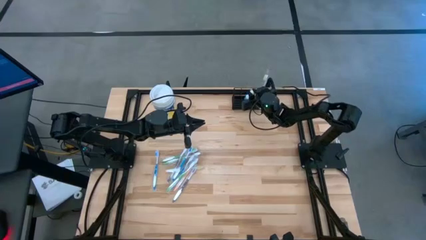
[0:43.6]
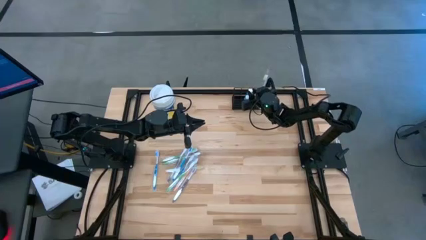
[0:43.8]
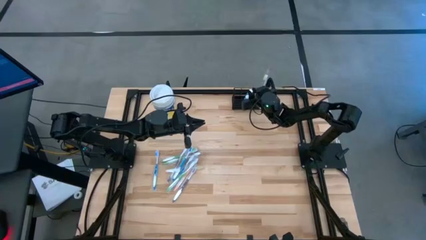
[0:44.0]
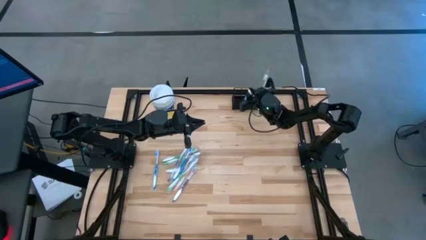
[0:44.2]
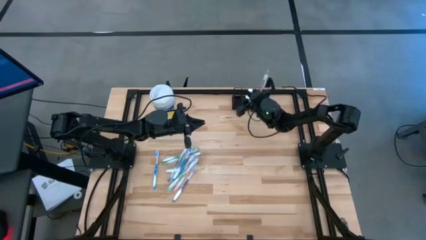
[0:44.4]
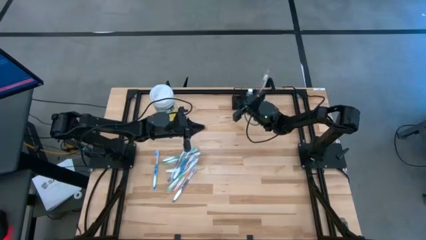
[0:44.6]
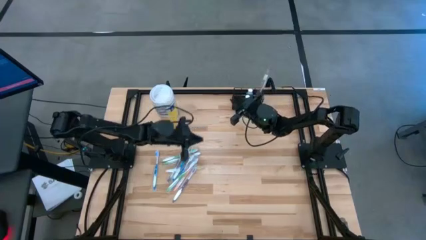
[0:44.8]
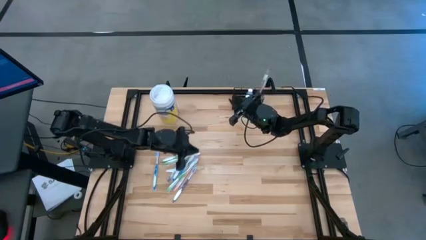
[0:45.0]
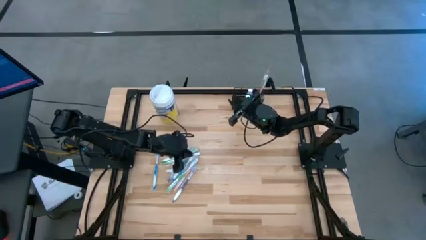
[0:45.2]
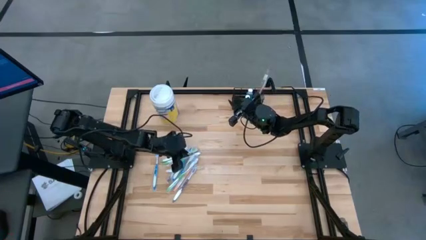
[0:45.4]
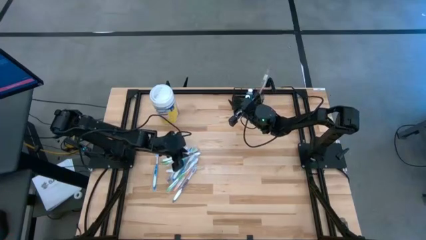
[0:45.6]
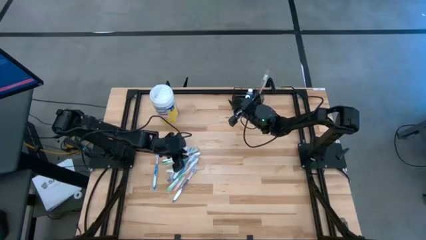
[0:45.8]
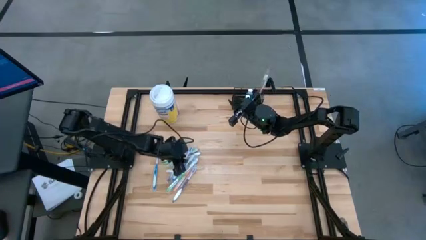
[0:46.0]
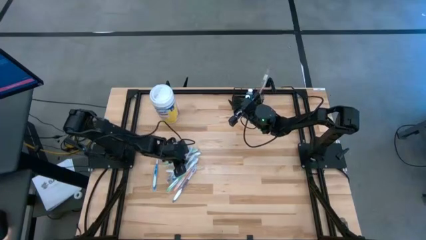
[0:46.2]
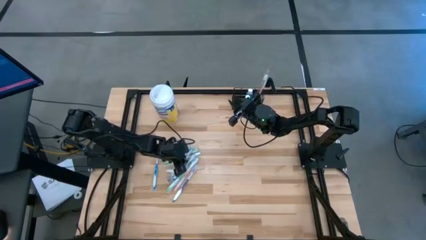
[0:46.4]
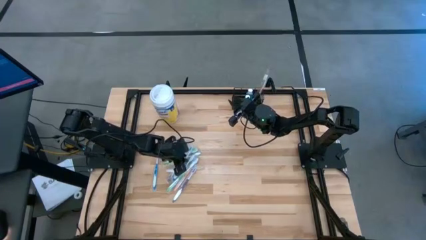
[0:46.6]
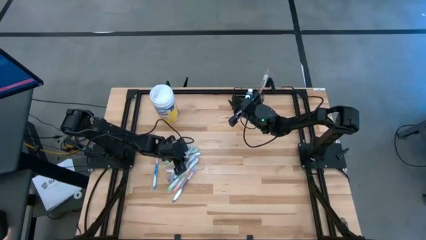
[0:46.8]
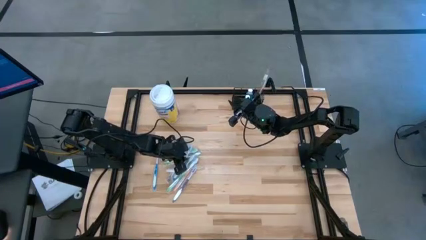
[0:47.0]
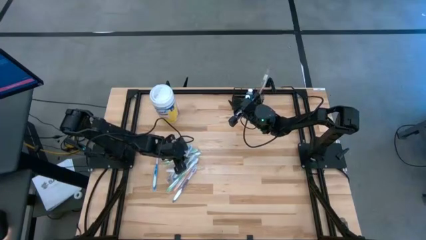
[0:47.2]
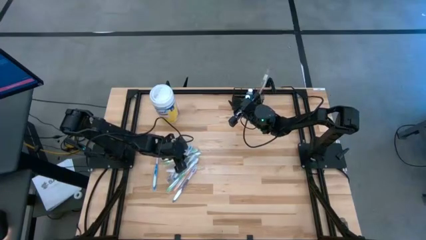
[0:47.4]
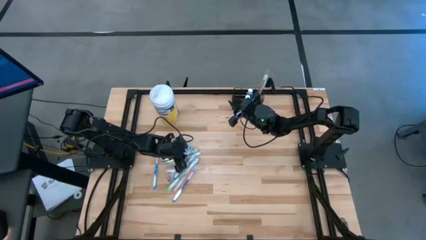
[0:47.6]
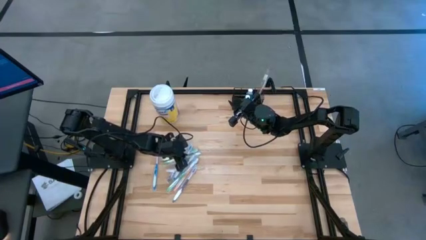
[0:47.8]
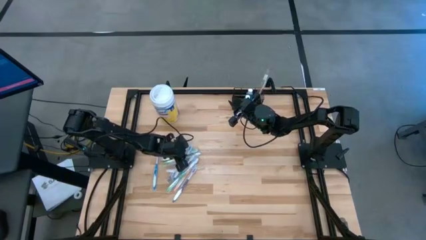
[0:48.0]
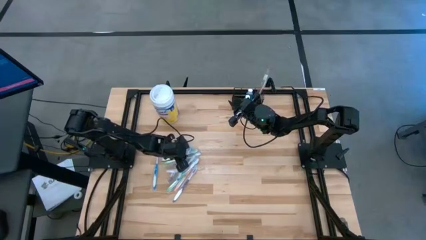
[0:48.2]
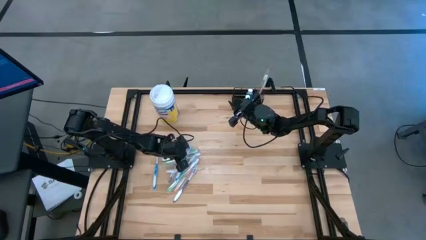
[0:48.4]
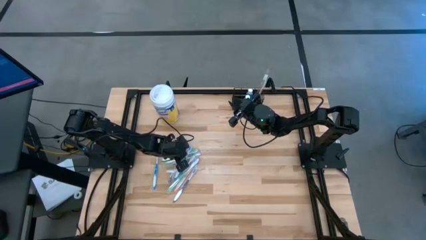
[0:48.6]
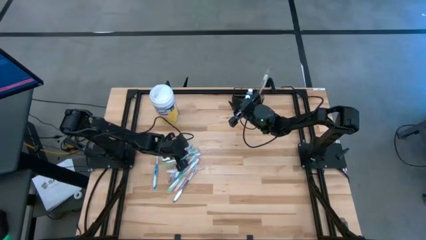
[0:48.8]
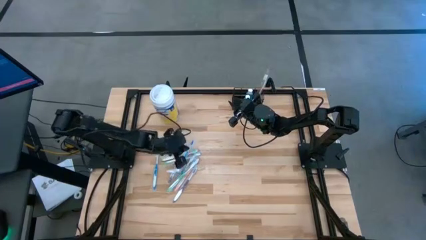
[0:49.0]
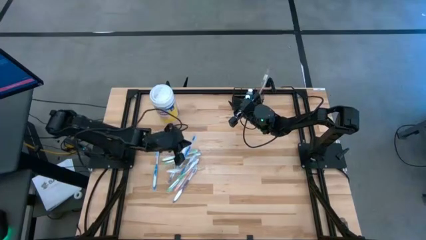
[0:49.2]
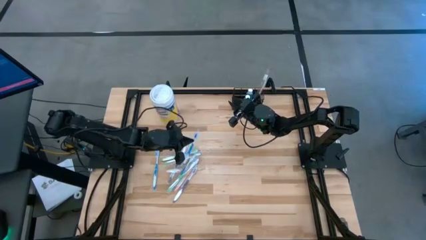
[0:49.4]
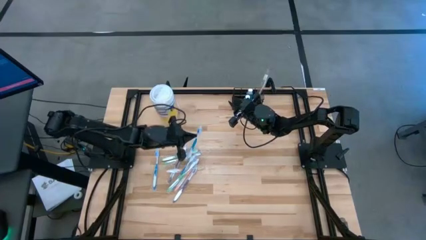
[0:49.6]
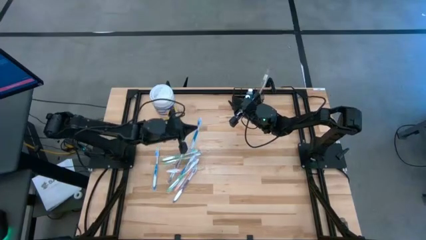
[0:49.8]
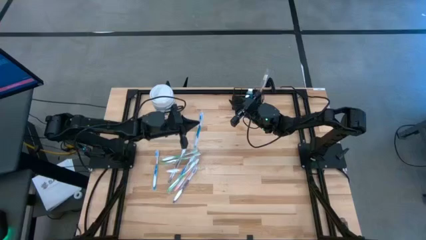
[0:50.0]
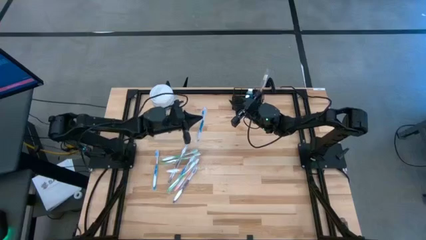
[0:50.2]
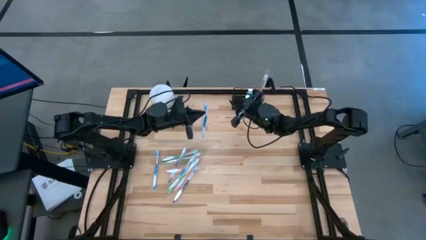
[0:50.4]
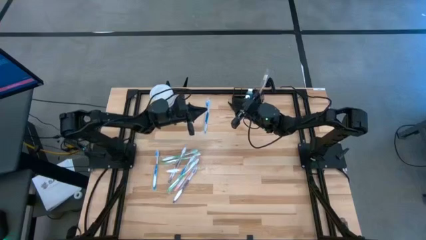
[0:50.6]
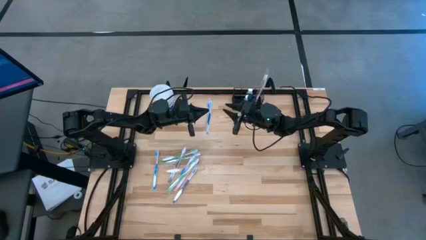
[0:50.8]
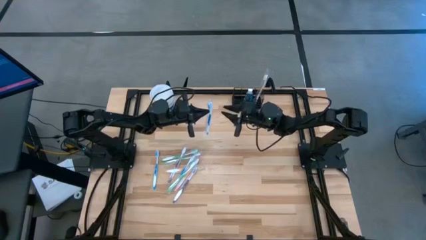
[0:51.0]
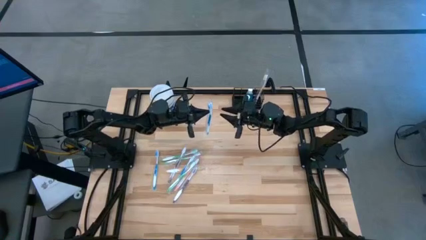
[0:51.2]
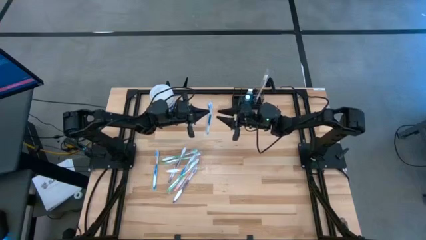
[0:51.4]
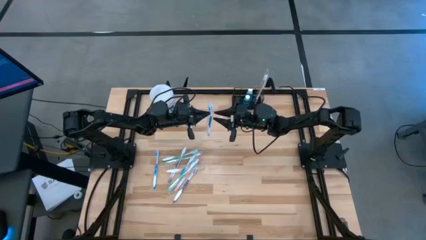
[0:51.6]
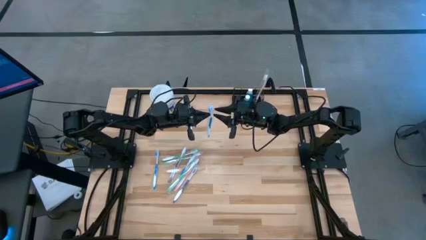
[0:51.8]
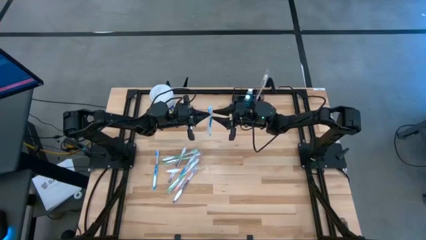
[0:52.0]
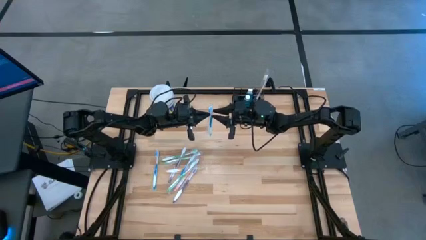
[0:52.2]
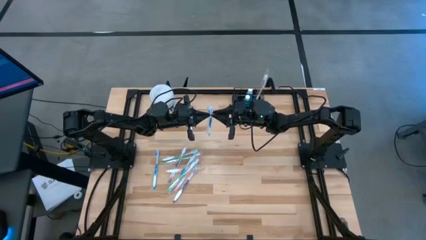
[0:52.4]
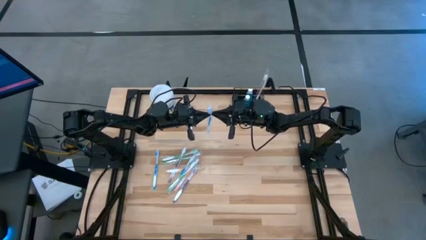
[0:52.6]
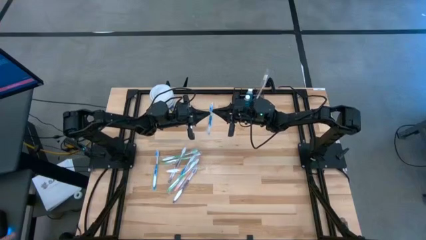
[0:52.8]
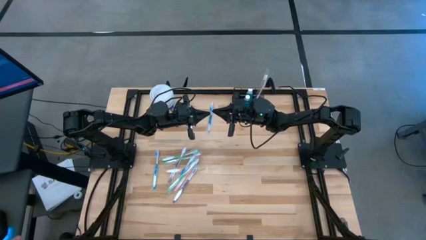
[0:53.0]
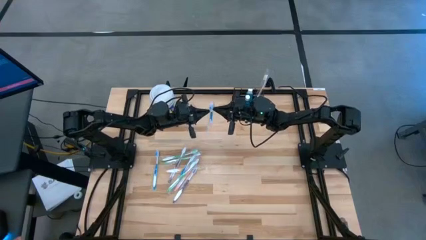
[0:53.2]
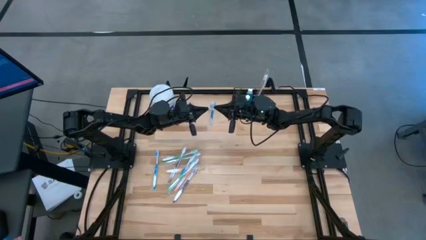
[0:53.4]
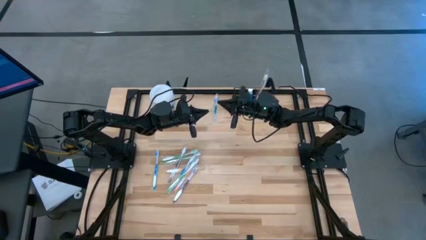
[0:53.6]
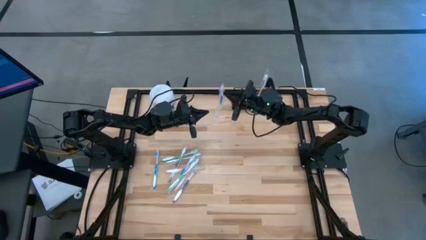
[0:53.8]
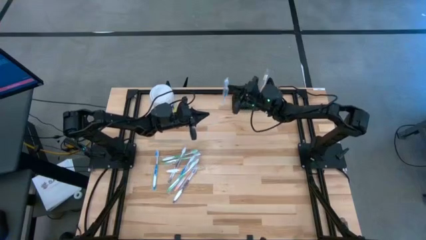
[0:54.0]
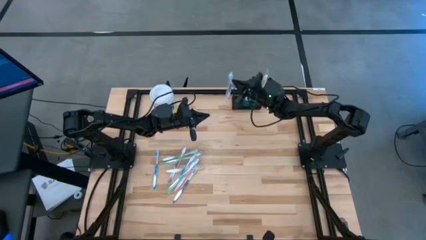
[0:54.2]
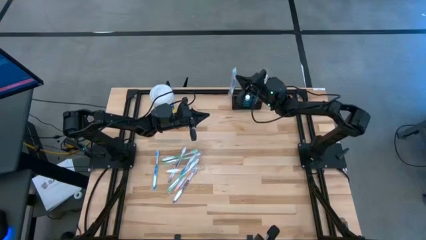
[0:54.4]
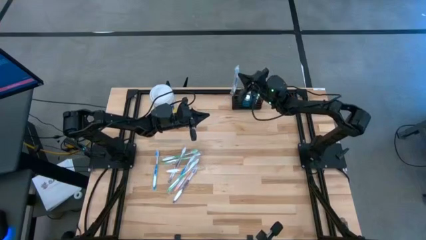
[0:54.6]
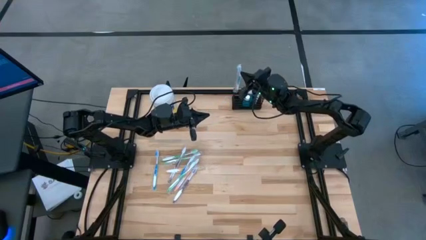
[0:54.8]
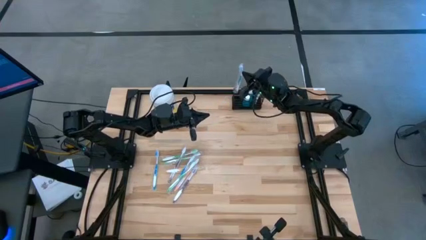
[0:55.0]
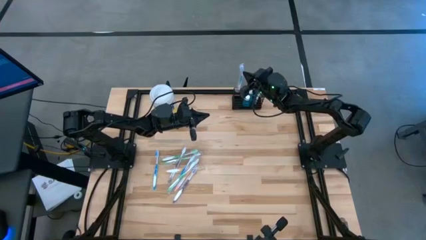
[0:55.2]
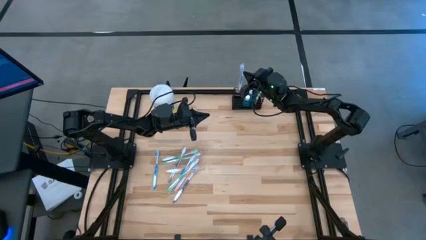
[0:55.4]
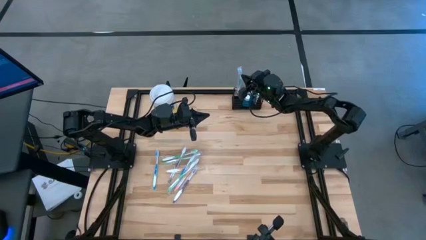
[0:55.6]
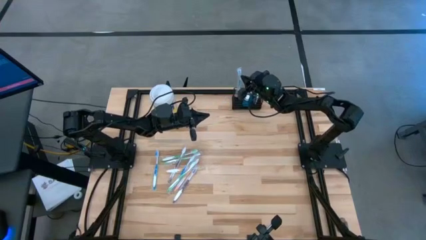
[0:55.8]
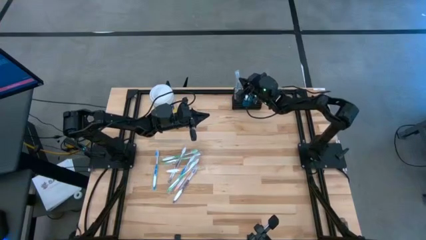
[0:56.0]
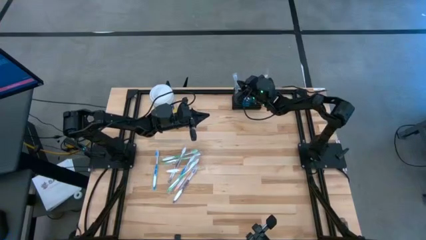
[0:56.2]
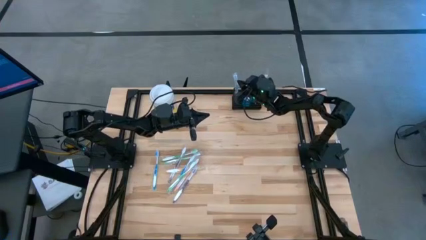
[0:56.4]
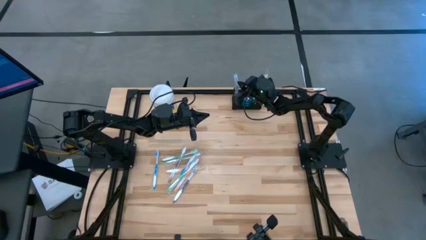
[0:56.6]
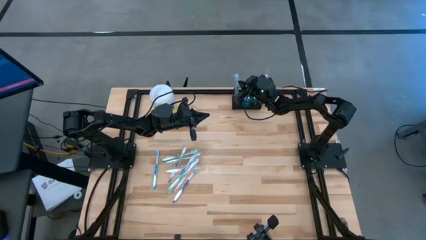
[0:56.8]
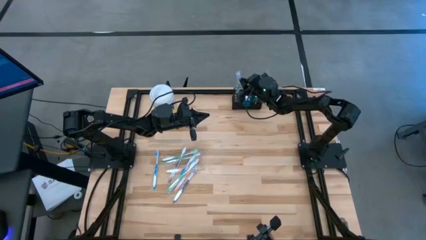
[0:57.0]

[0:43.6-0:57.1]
Task: Pick & Place toothbrushing station
Put the blue toothbrush into the black mesh organizer
